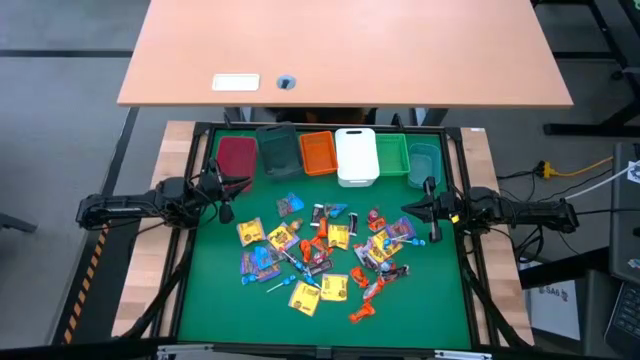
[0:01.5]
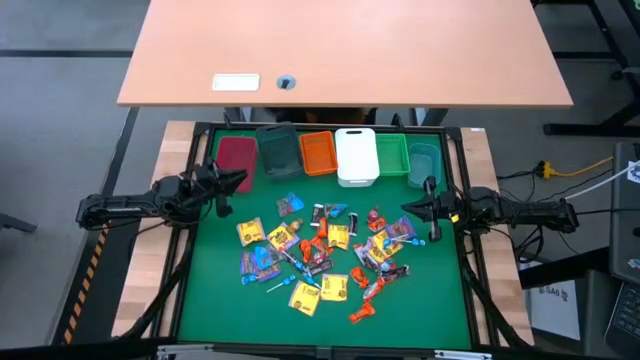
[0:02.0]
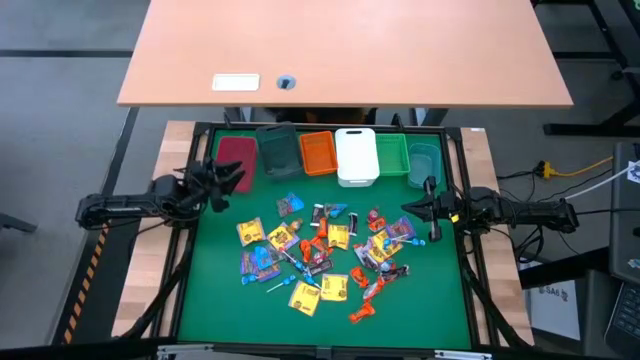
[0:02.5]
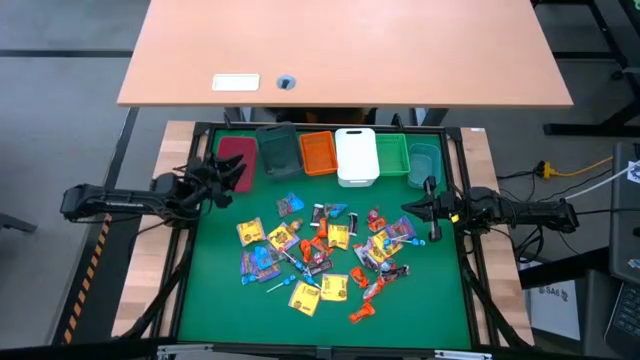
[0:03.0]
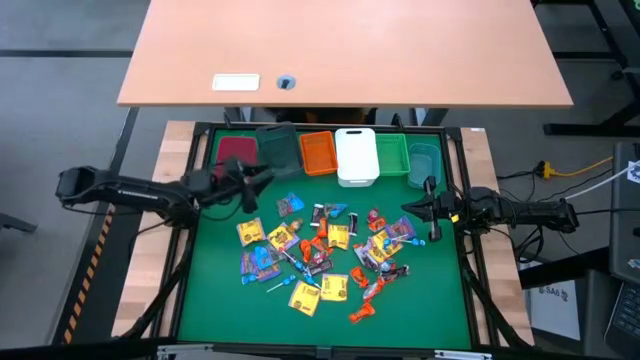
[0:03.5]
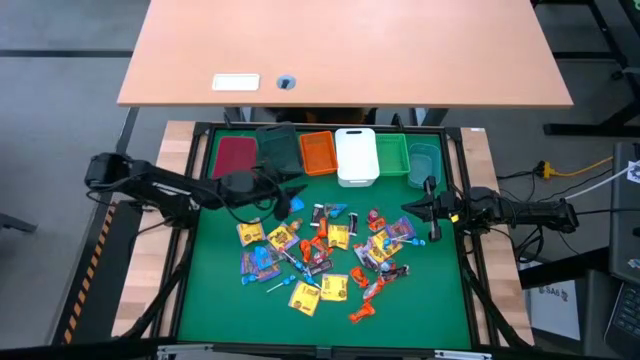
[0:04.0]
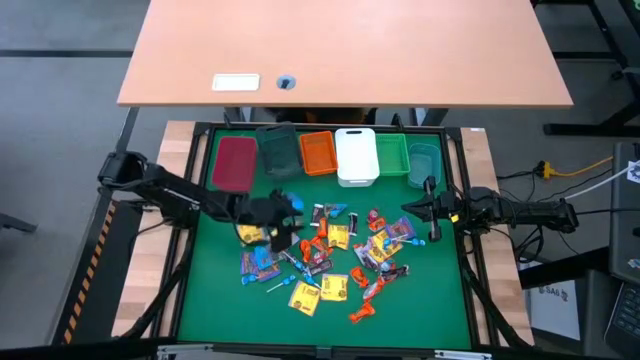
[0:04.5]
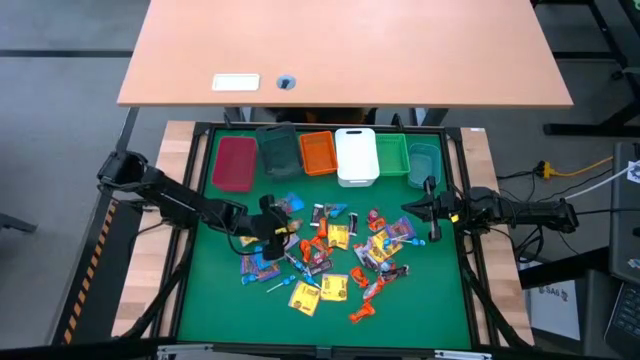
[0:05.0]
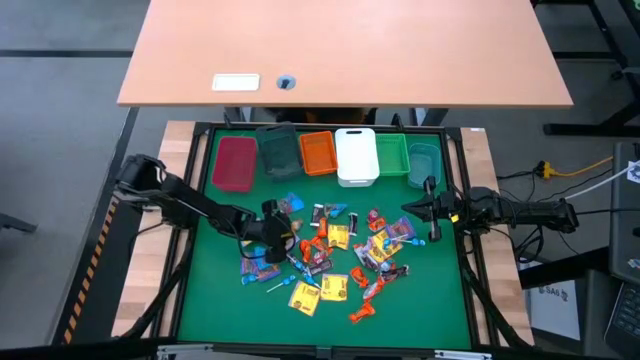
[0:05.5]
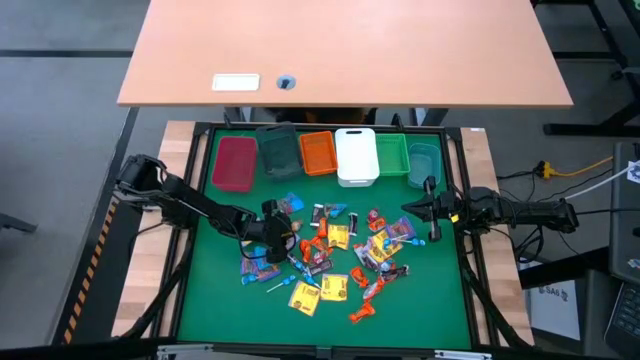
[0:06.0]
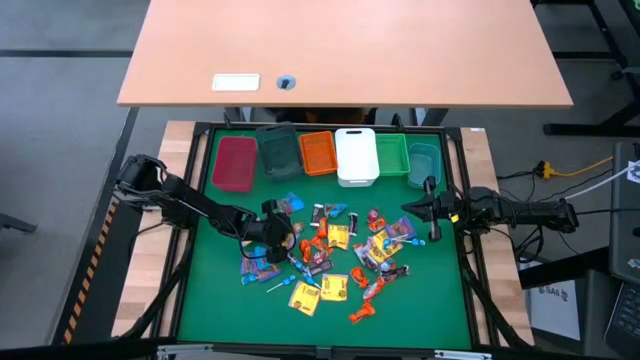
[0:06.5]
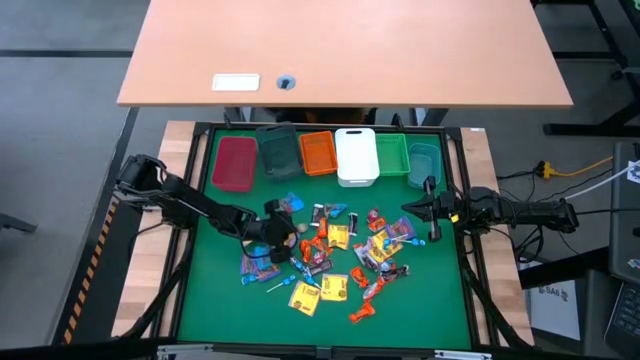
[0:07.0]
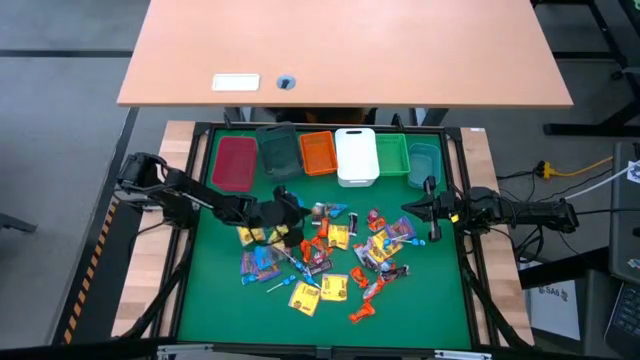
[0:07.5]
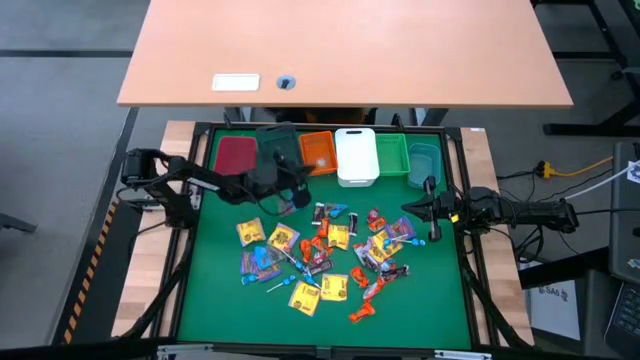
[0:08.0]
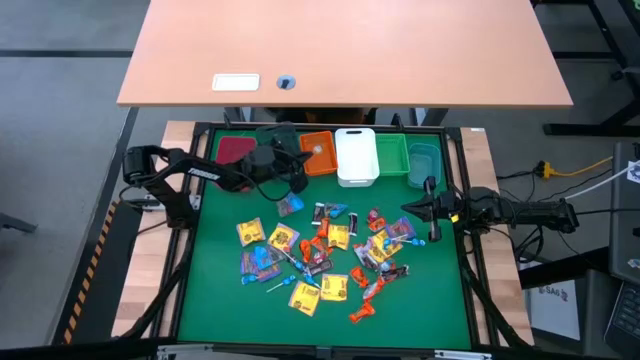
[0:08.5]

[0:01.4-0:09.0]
Task: Sort candy
Put the dark yellow candy into the orange bin

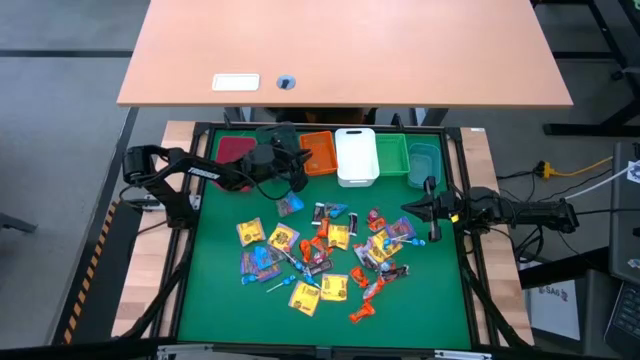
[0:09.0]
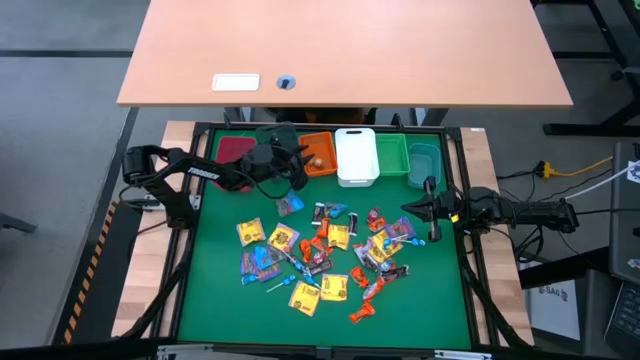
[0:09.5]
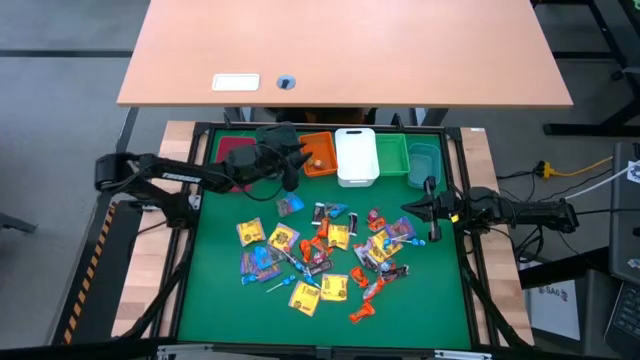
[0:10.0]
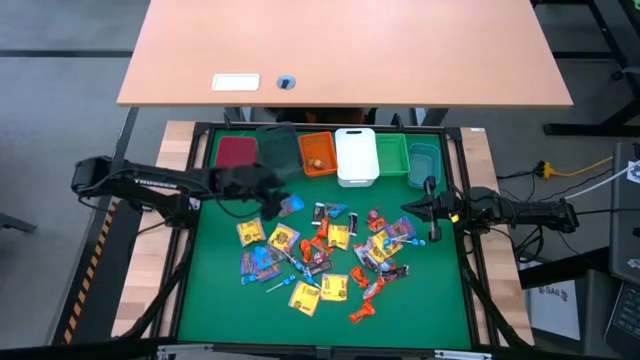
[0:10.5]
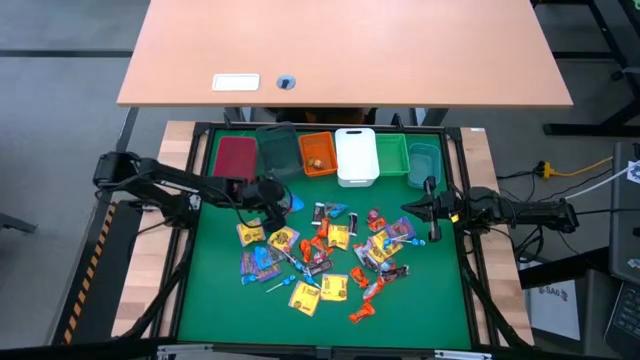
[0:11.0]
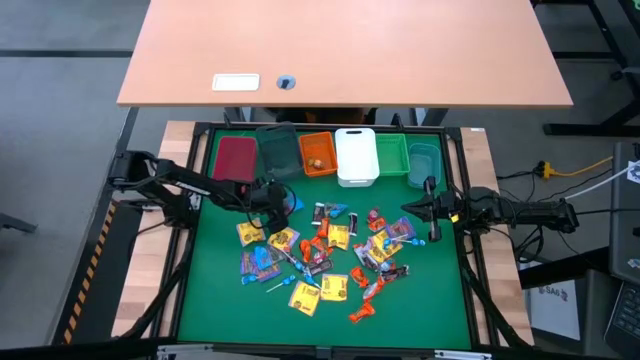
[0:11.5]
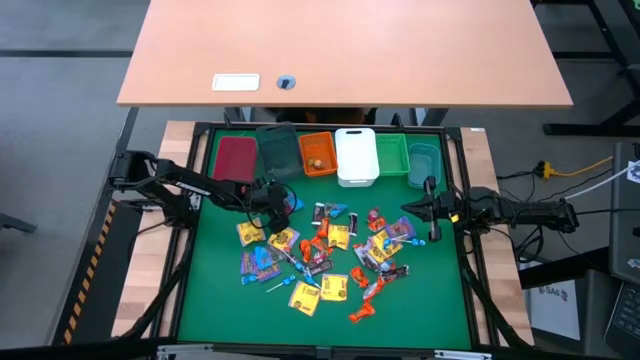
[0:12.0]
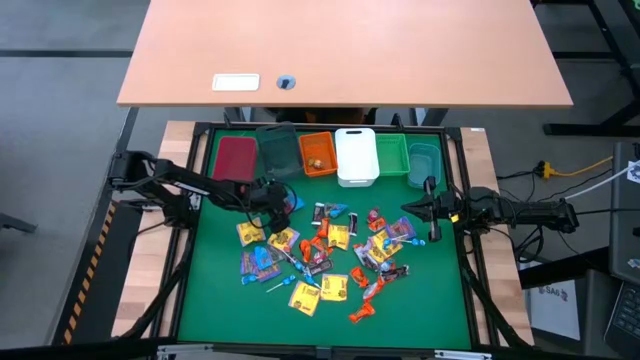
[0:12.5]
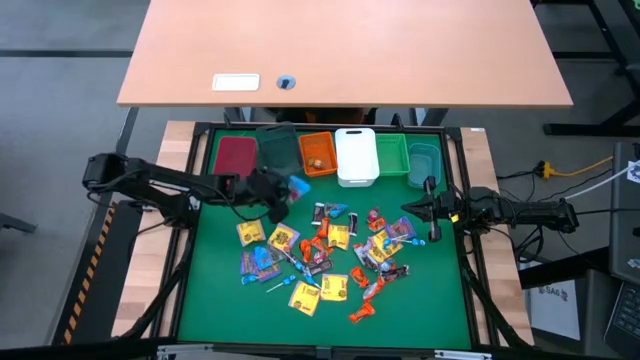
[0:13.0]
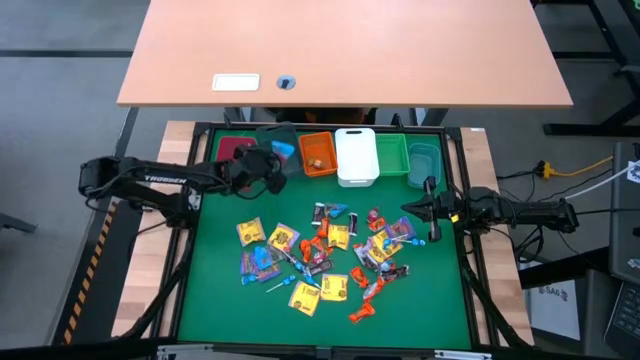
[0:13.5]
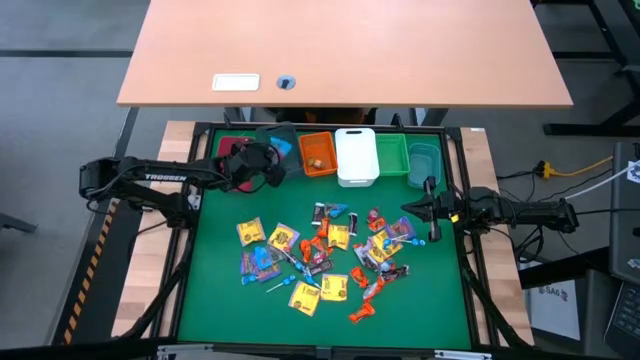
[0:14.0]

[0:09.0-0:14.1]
Put the blue candy into the black bin

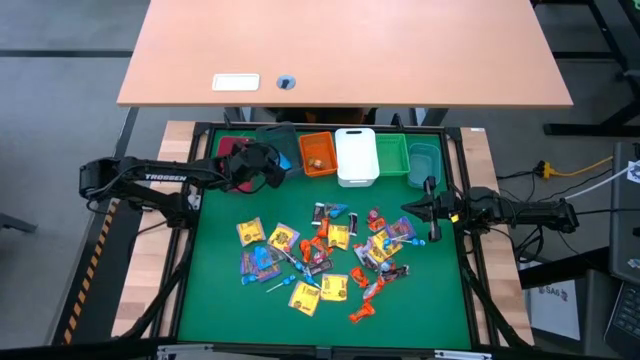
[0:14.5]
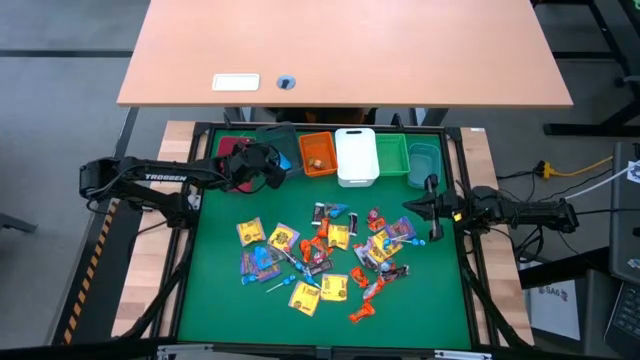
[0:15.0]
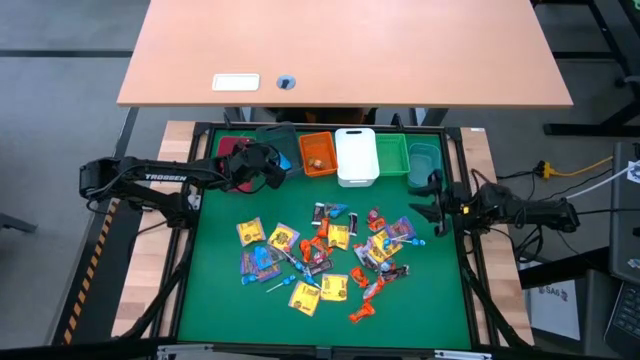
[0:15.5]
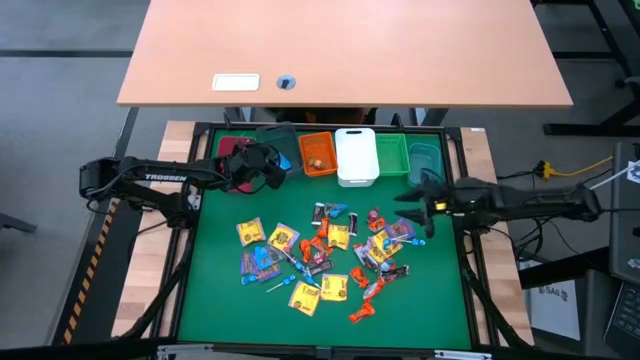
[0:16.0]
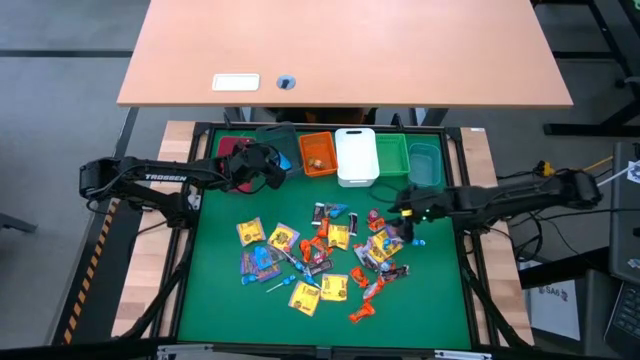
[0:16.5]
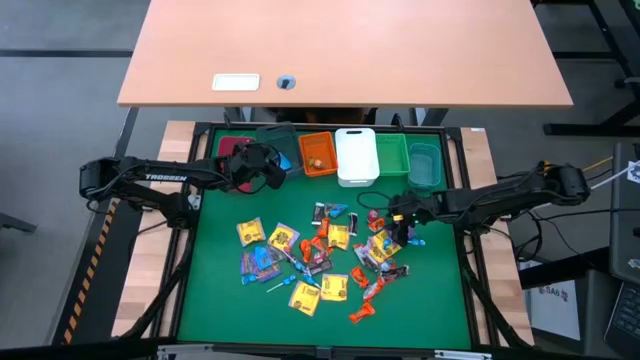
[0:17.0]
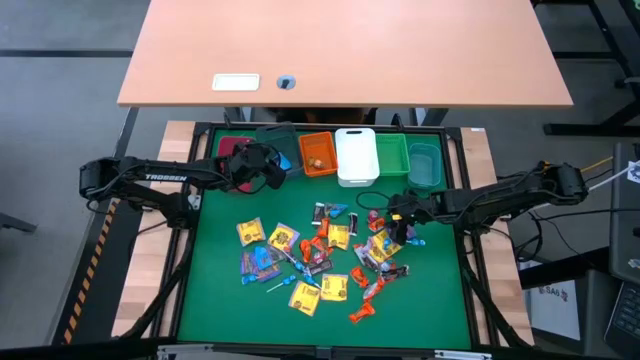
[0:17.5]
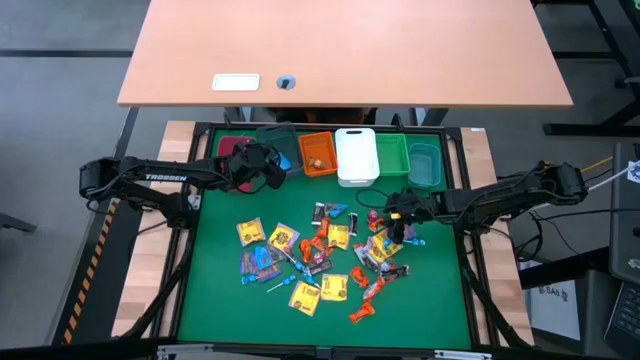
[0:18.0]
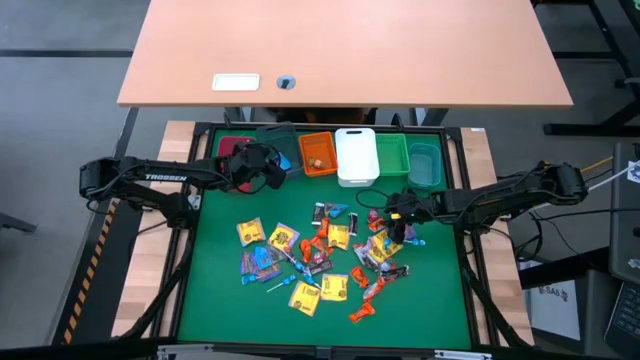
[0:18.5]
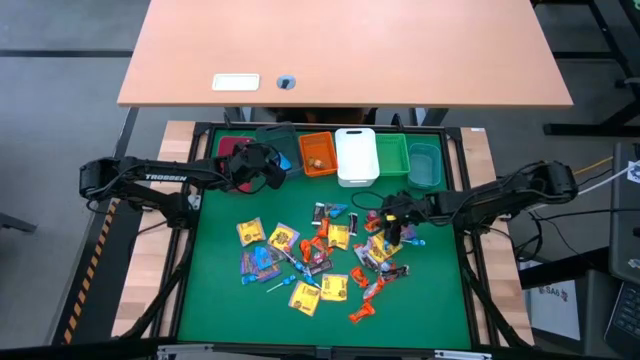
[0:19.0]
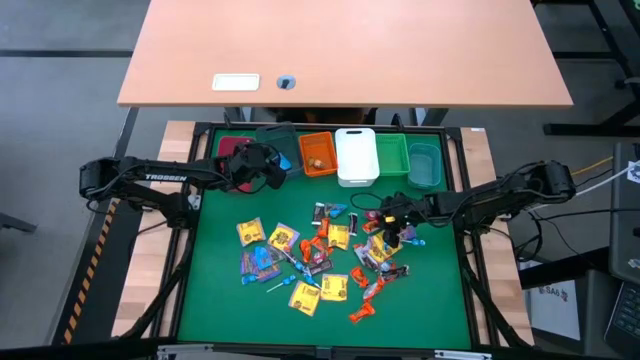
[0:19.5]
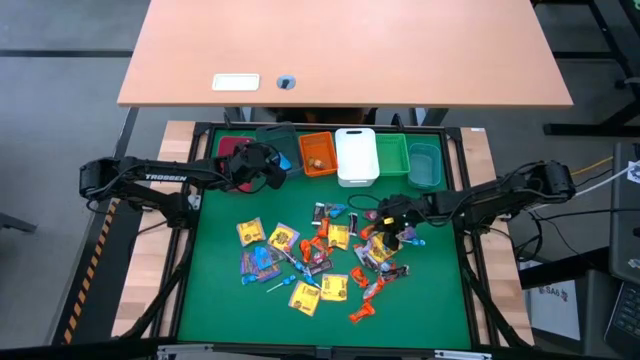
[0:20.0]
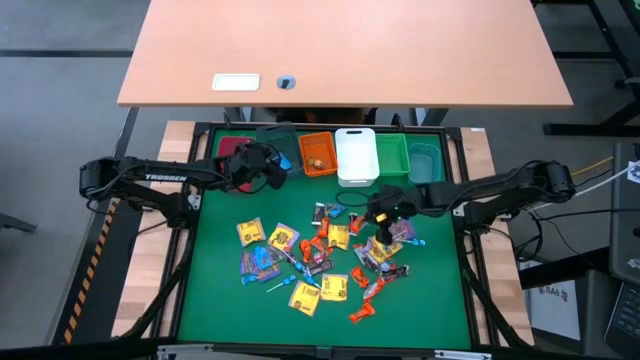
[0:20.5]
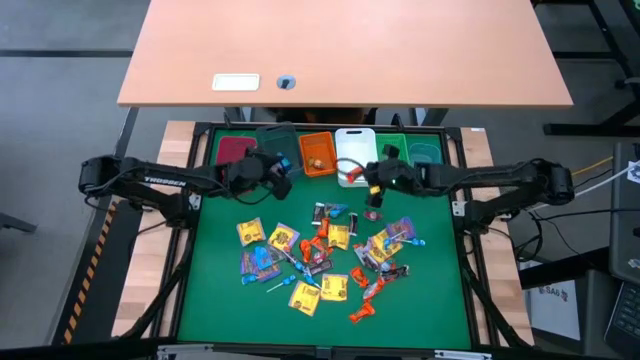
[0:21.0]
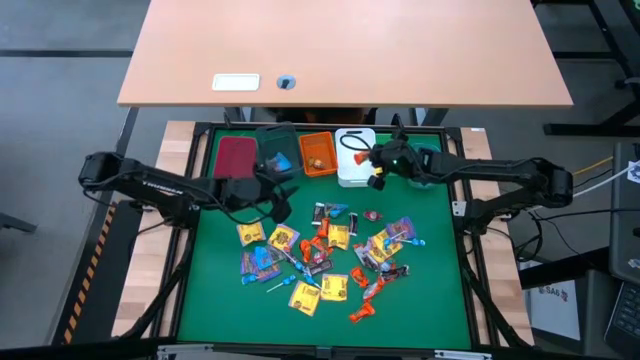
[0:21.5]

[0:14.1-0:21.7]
Put the orange chocolate into the white bin
